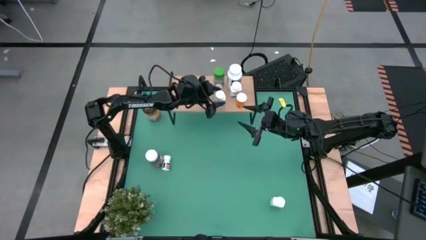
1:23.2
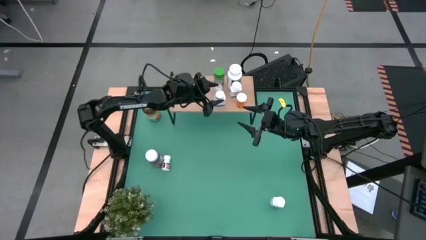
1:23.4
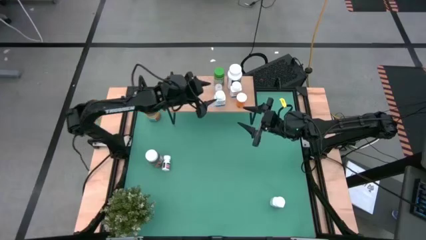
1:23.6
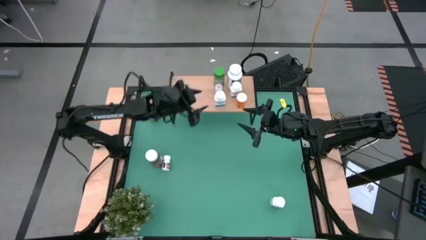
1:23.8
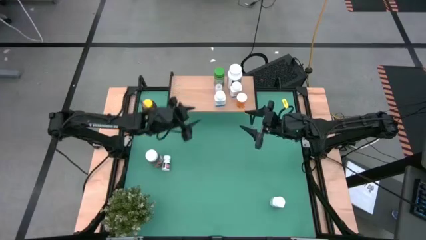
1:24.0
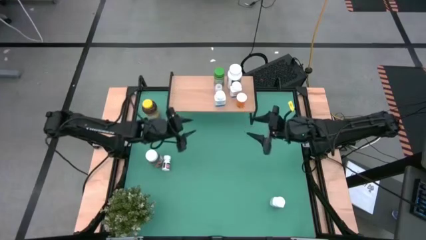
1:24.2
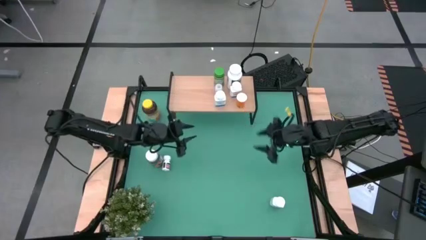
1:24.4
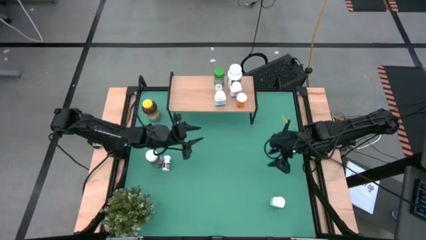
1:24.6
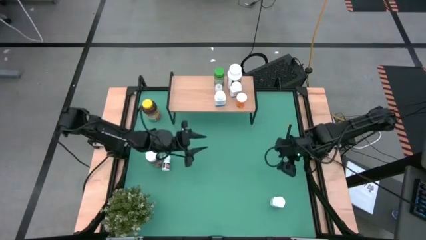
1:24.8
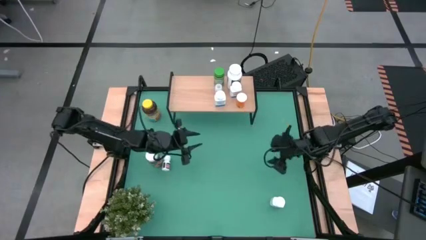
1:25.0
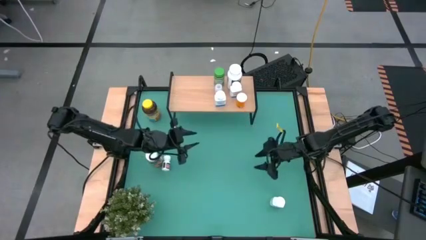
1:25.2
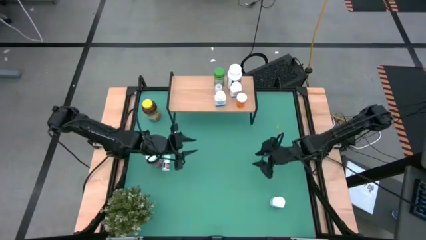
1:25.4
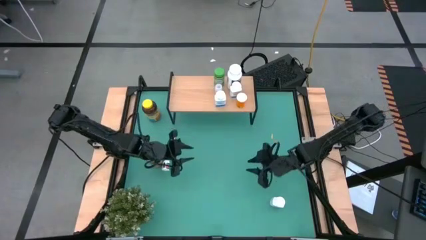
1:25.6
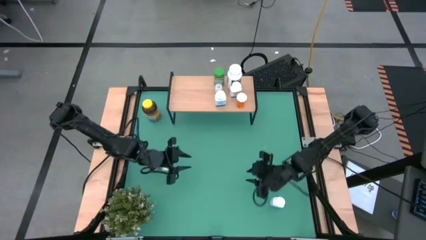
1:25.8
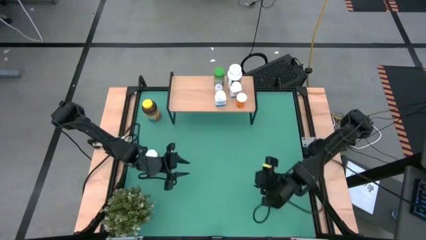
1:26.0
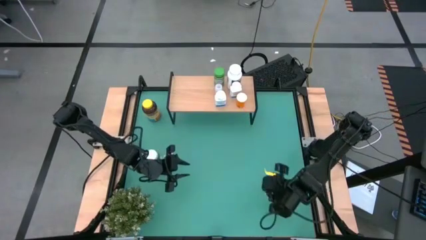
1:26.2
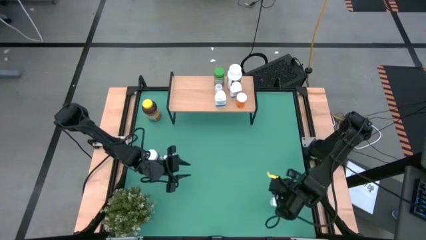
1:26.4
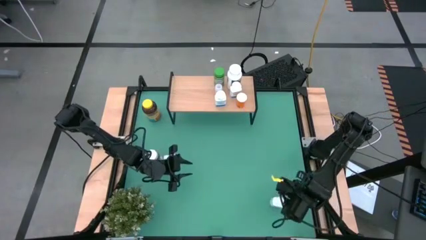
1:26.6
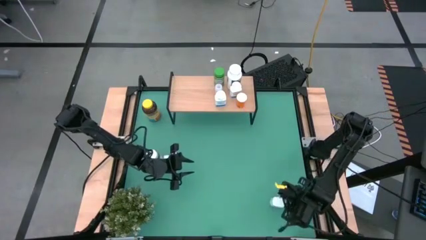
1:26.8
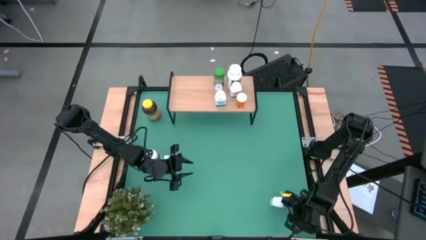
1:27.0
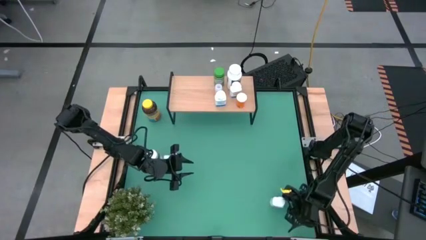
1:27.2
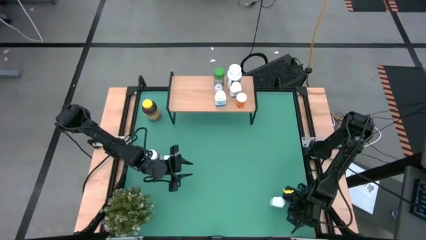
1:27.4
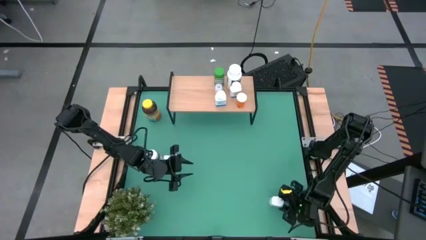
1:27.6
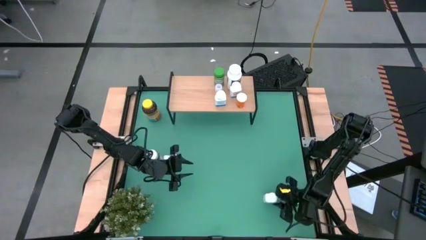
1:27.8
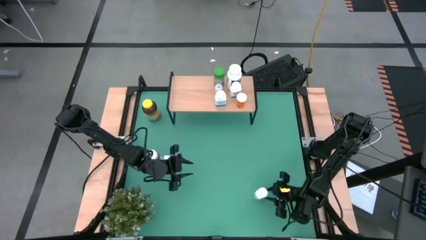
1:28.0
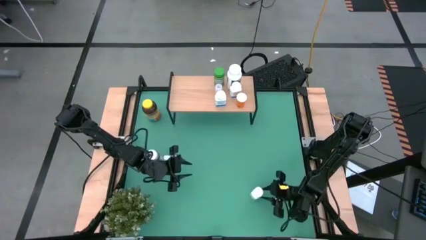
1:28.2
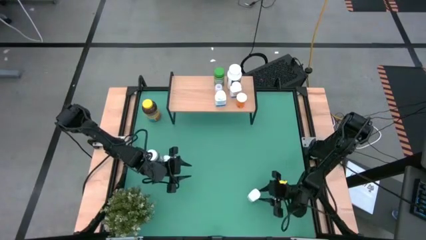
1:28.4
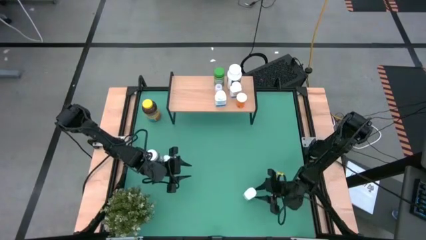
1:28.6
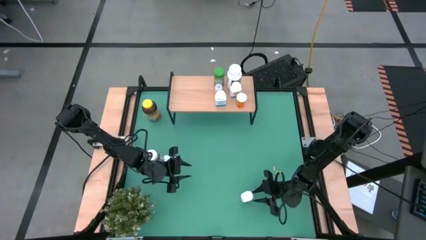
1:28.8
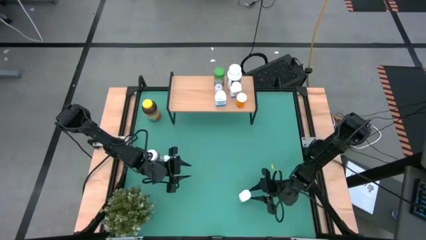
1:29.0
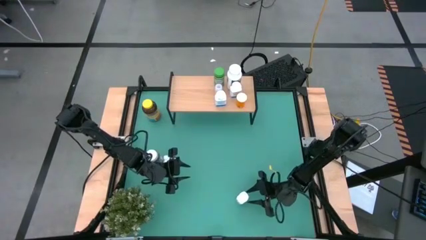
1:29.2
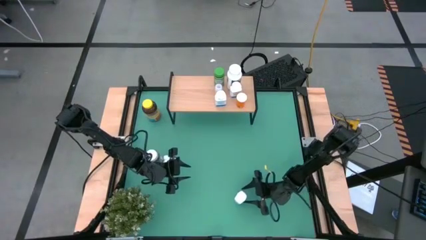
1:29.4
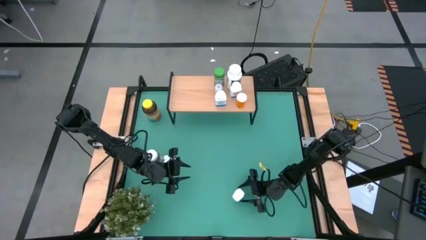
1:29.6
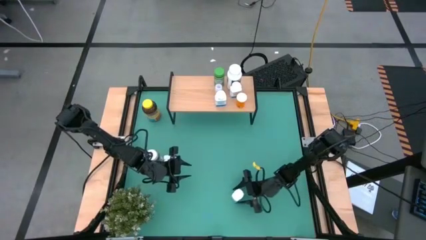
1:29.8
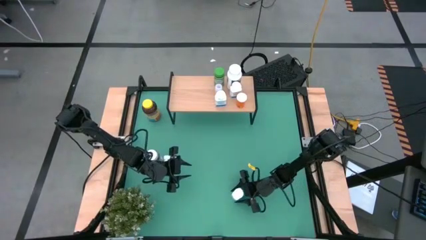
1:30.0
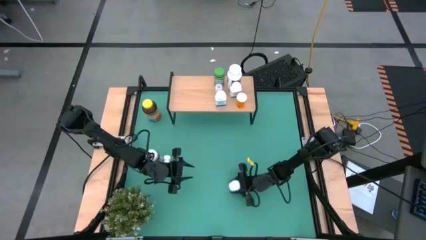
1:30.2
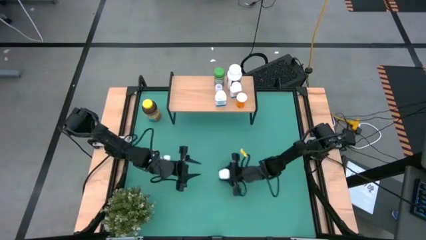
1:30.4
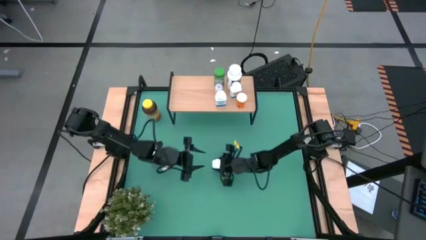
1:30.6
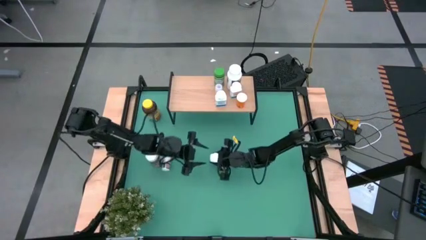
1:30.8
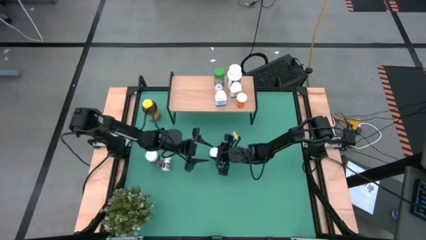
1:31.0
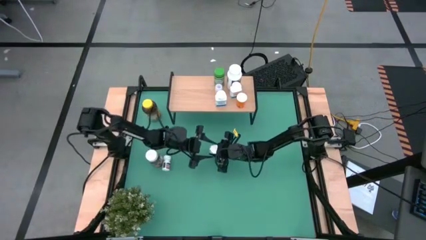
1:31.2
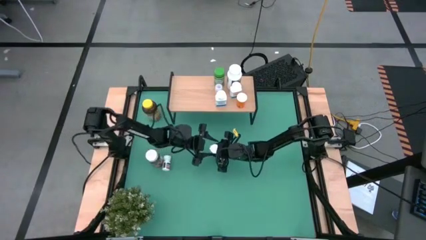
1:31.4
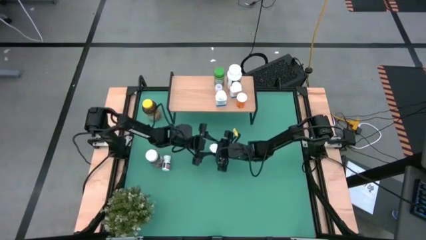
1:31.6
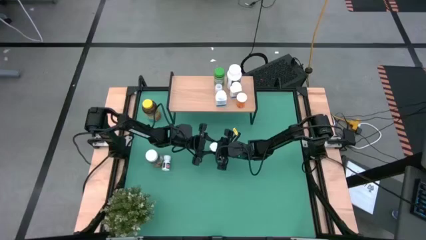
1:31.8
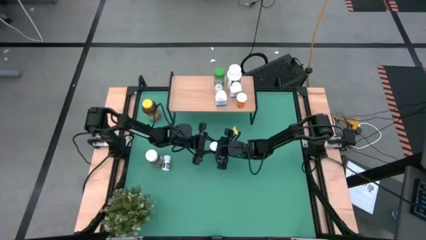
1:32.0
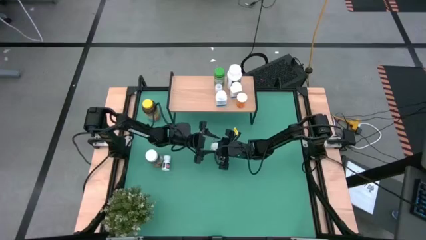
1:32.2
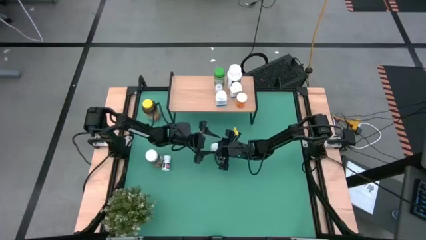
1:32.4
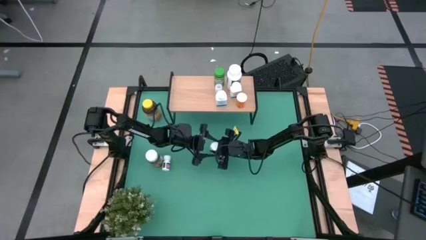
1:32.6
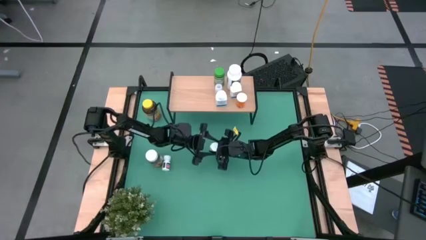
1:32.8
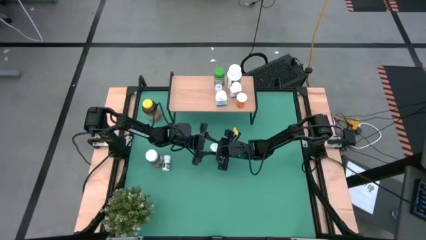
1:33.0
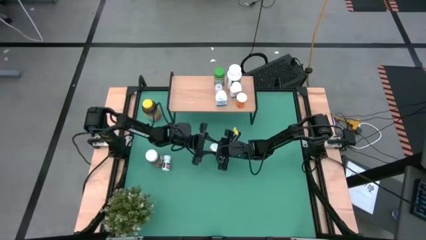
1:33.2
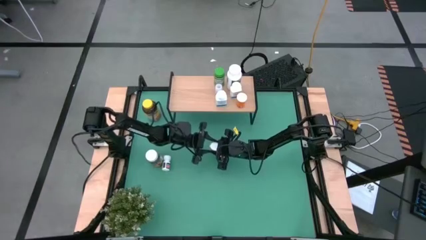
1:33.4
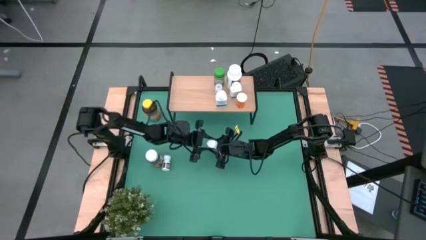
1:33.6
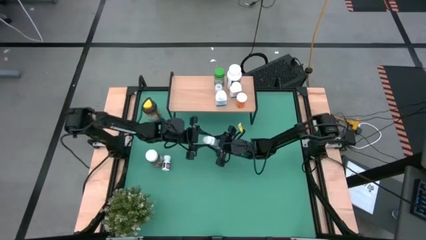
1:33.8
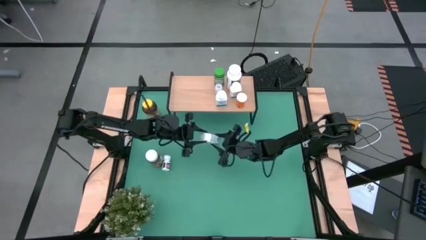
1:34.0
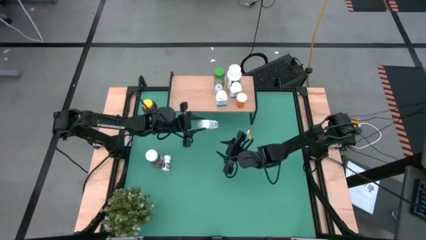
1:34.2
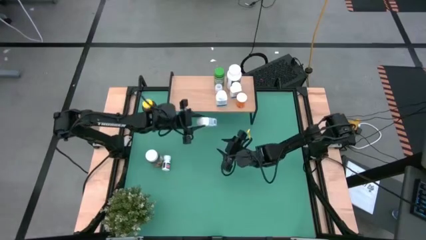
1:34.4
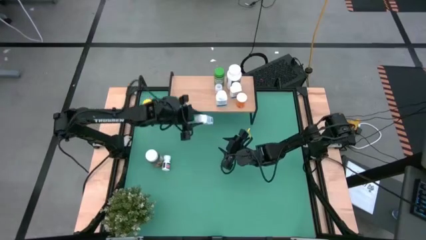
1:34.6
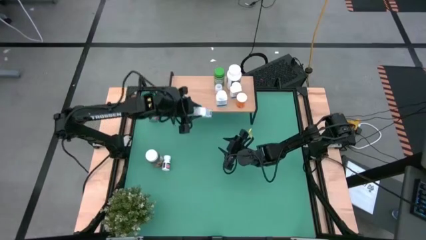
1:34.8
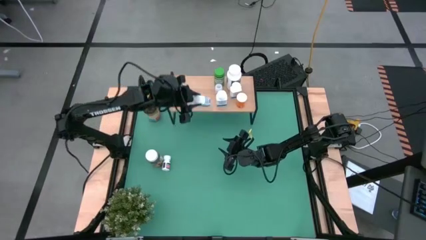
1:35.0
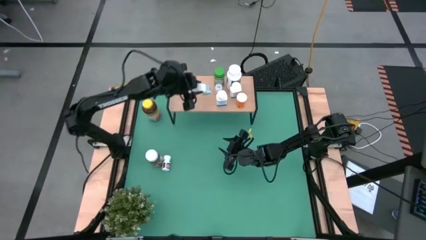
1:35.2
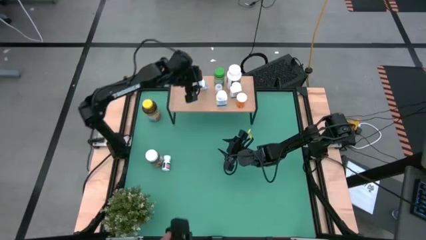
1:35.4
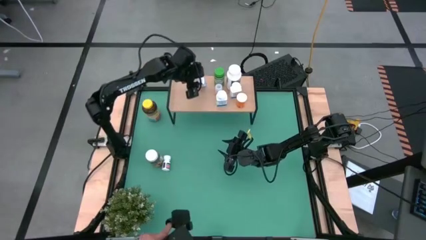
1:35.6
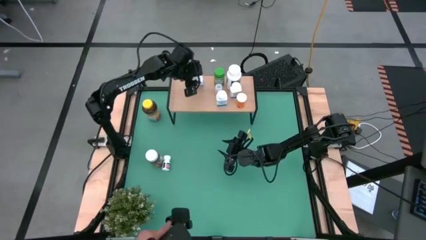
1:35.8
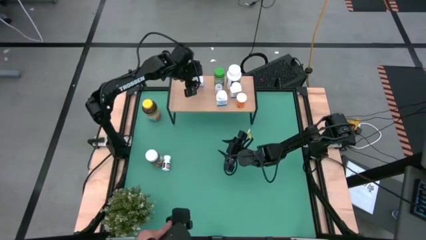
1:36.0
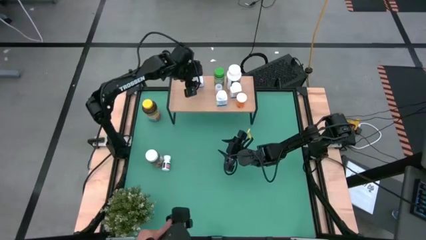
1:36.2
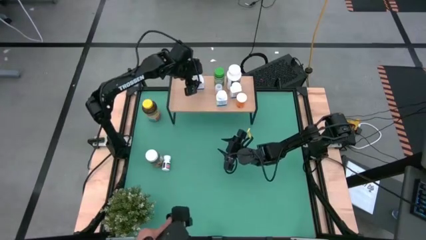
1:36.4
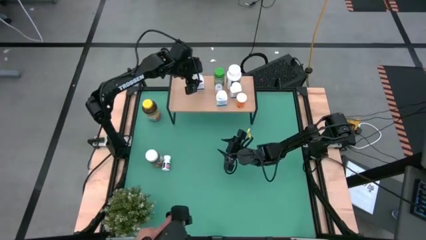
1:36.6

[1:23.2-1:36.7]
Task: Pick and place medicine bottles onto shelf by color
Put the white blue medicine bottle on the shelf

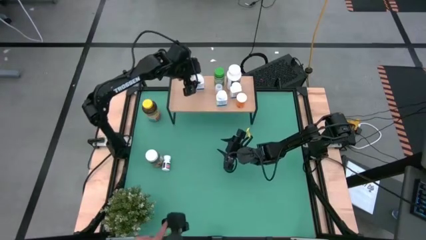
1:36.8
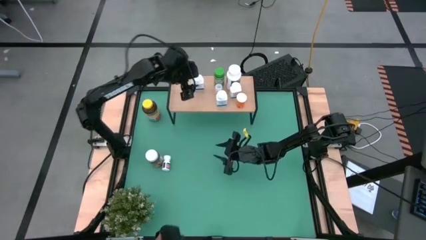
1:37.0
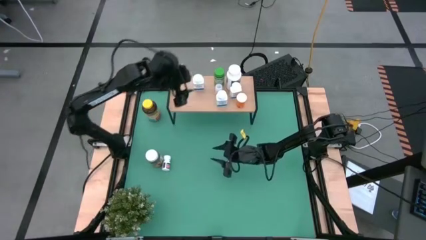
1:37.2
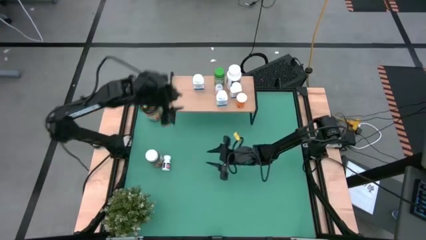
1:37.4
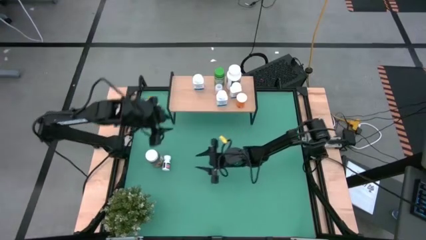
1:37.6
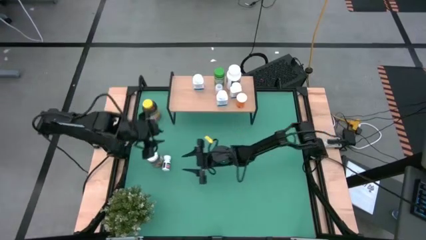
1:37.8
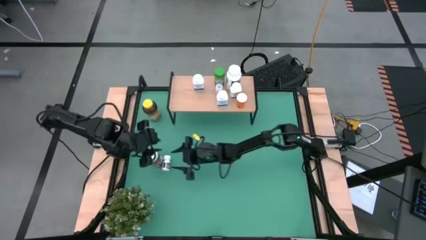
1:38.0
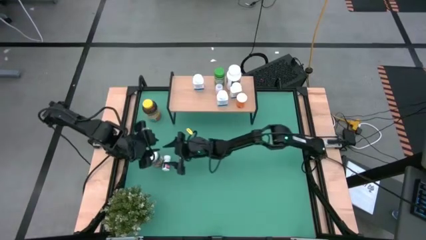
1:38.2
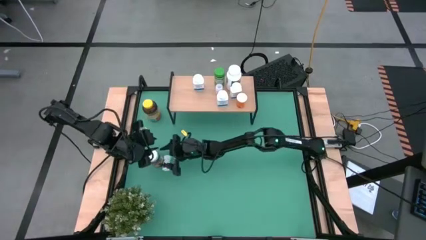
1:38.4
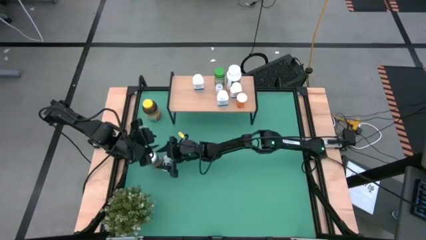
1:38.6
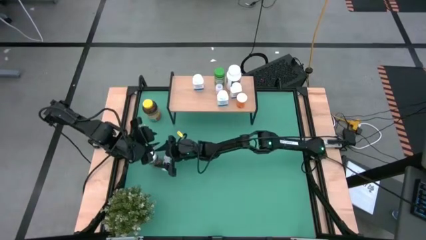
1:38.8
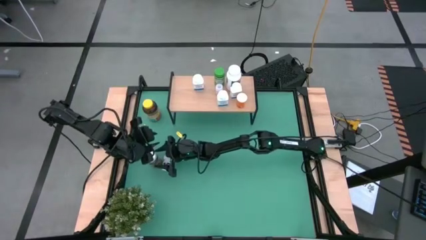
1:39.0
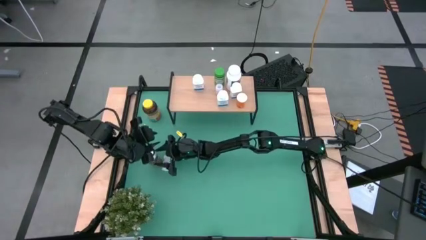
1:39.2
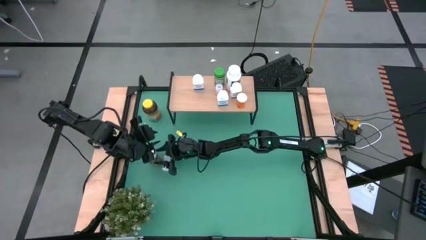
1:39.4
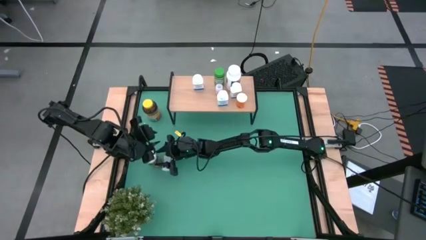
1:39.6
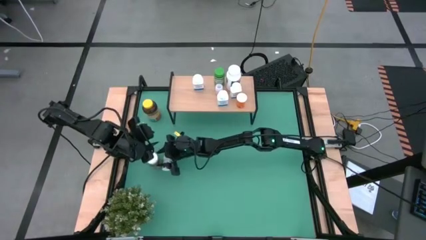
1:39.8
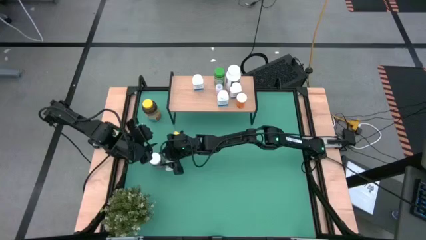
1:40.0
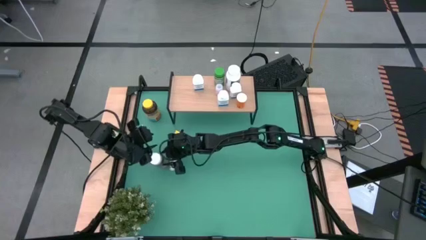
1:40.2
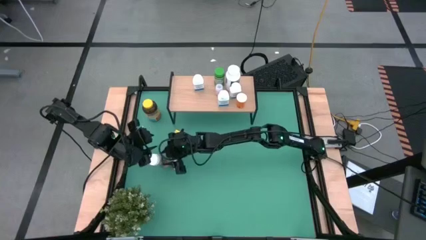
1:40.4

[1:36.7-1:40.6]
Put the white green medicine bottle on the shelf
